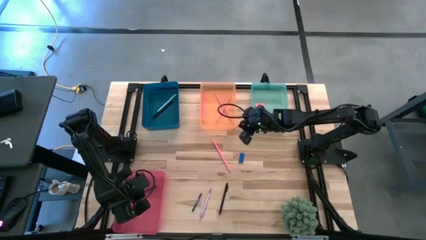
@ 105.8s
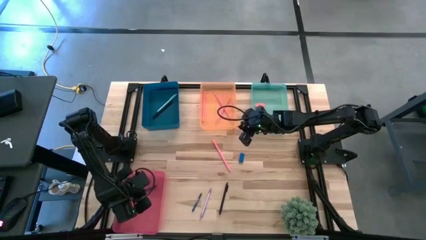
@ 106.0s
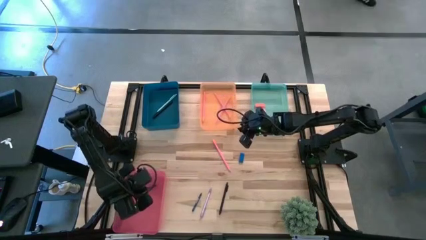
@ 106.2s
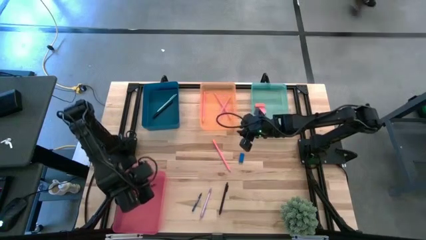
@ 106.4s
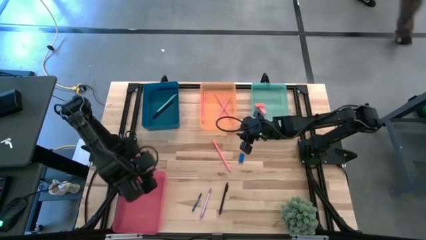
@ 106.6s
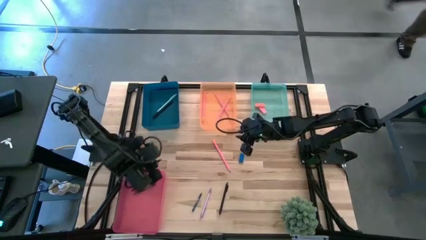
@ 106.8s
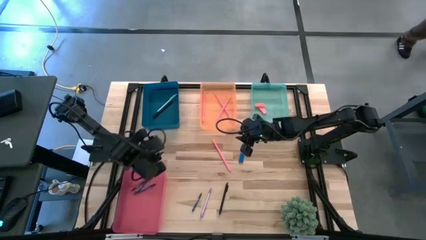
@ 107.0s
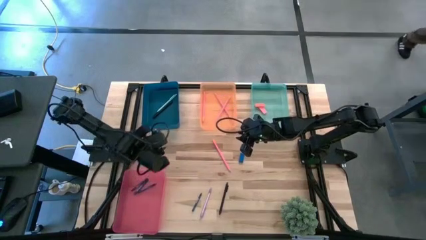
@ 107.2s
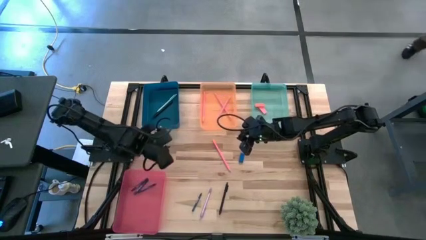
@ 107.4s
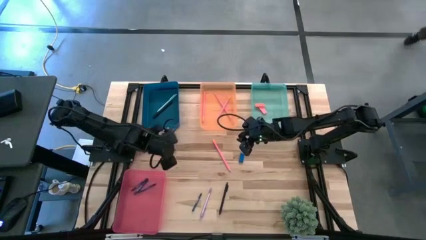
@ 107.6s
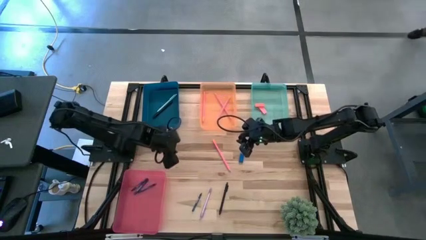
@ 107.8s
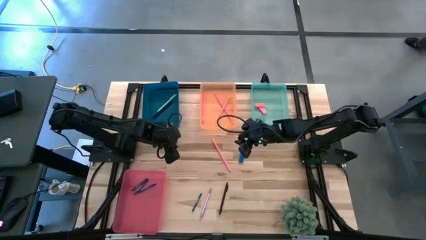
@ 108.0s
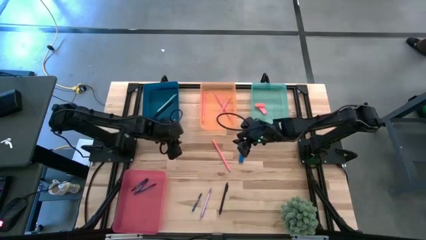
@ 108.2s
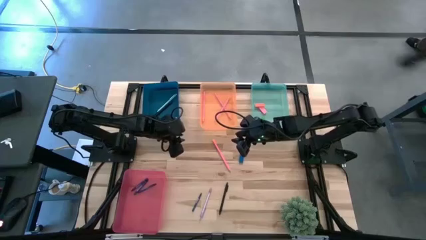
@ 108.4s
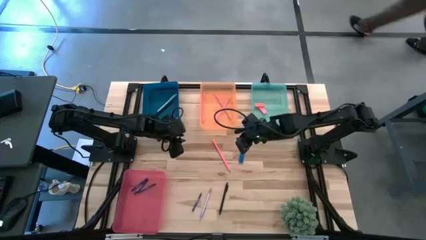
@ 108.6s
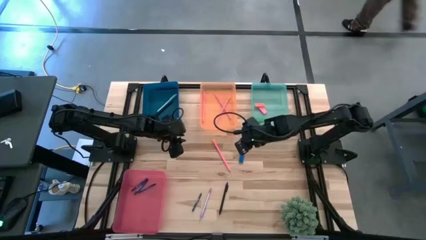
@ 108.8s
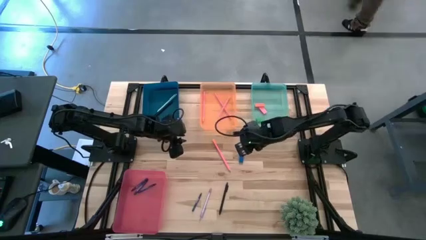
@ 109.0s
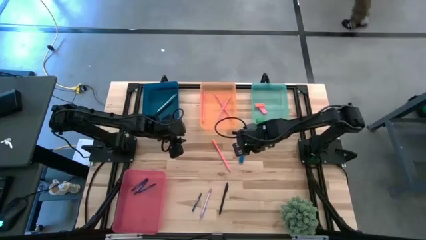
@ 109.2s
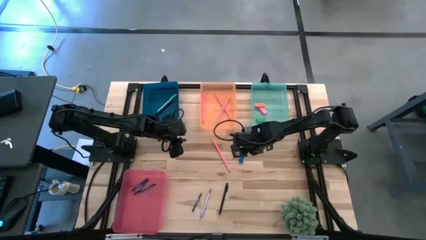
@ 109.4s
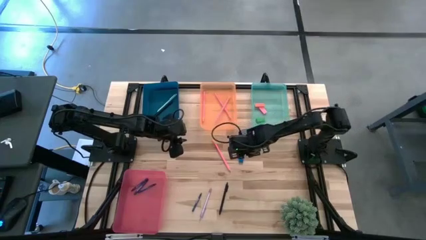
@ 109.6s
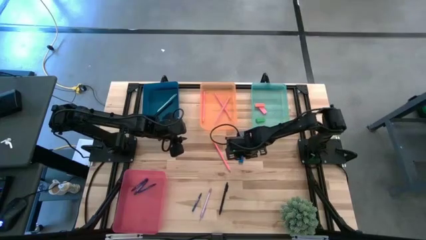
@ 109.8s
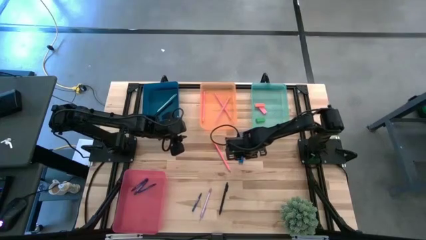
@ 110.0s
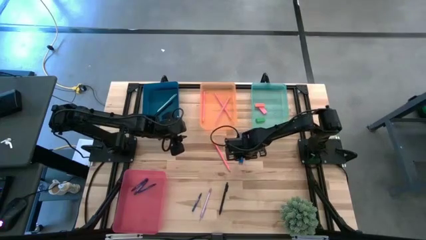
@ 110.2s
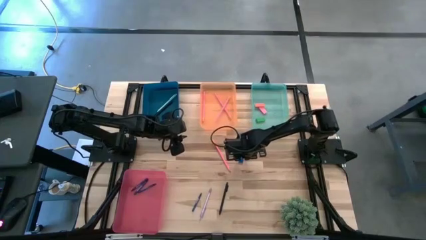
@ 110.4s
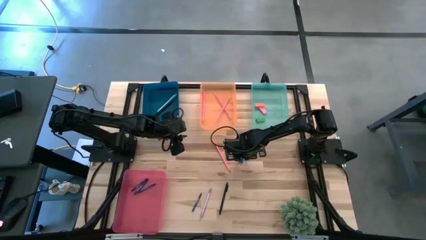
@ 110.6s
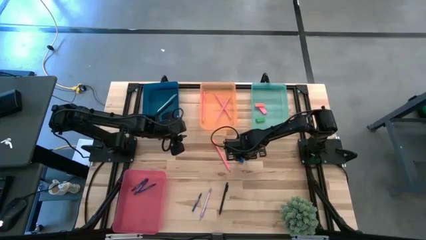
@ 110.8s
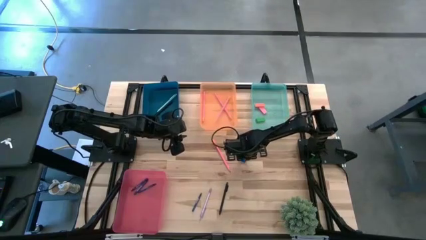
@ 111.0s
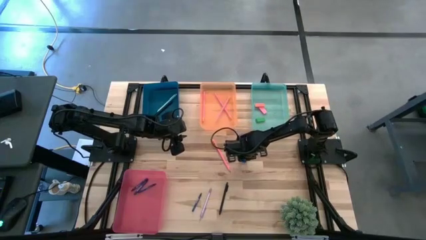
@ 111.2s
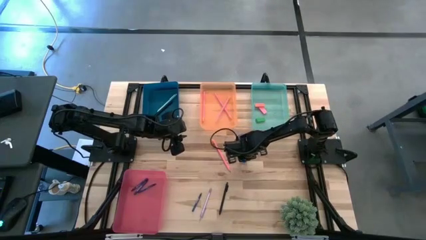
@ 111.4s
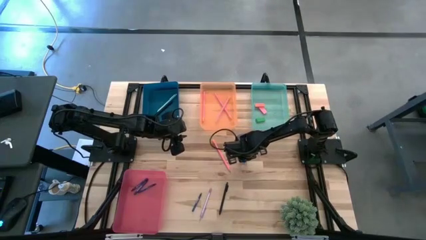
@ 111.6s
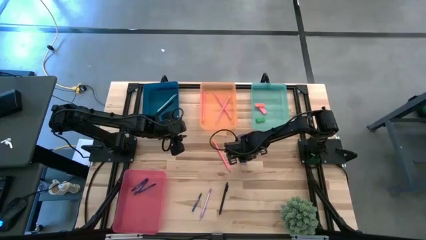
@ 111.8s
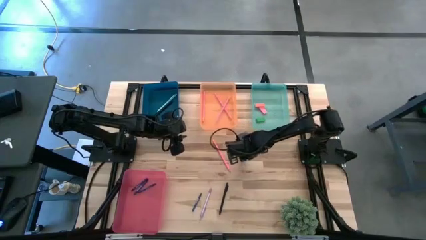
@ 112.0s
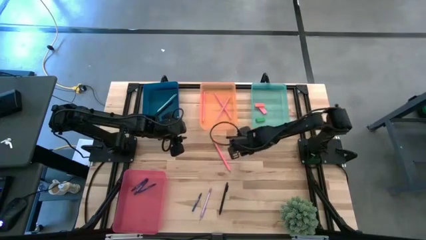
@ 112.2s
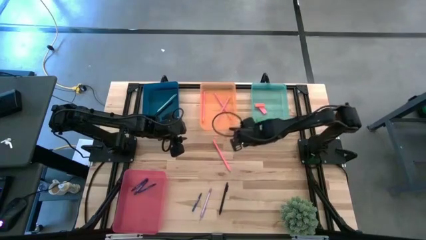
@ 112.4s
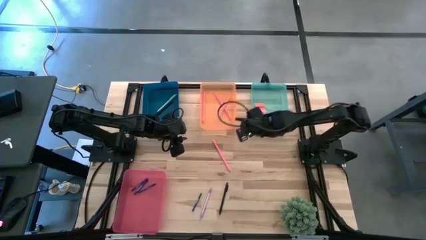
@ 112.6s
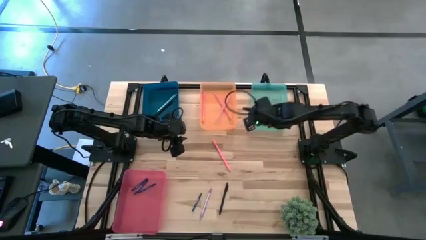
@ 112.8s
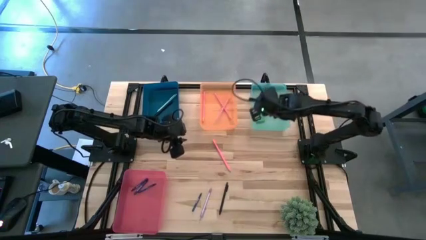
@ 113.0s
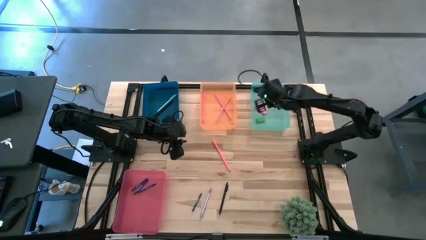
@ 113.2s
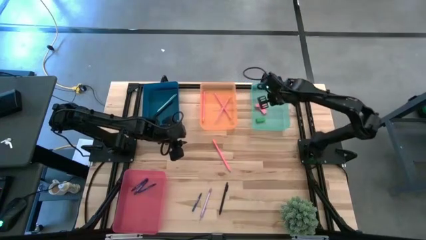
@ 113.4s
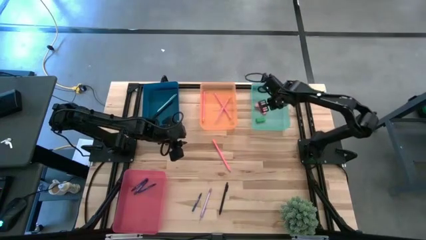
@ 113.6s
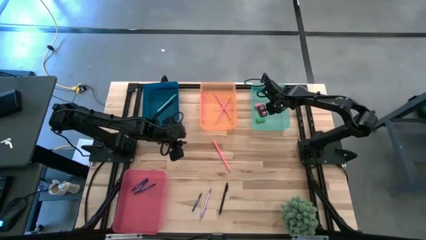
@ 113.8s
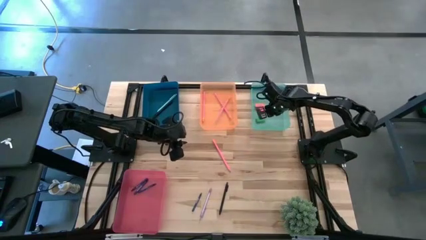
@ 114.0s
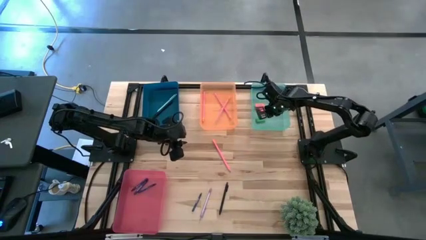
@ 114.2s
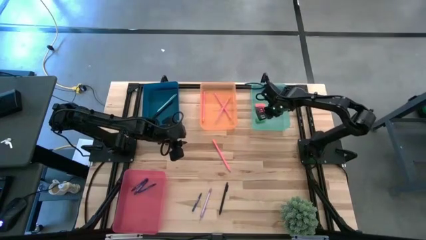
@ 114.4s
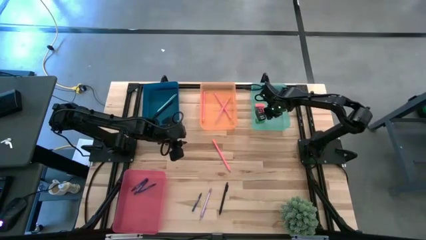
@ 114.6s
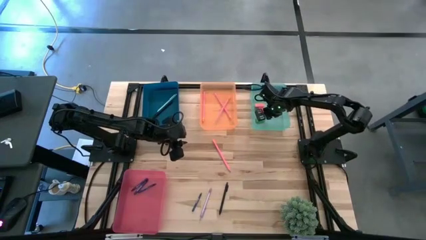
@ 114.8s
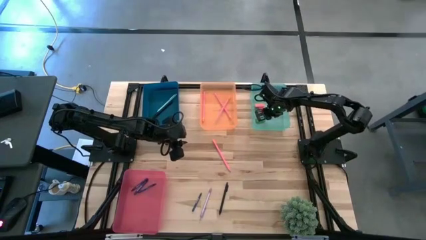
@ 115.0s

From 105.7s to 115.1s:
Task: Sort crayons/erasers/pens/pencils in bins
Put the blue eraser into the green bin

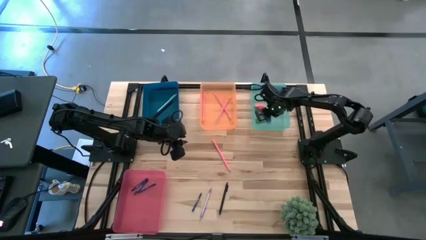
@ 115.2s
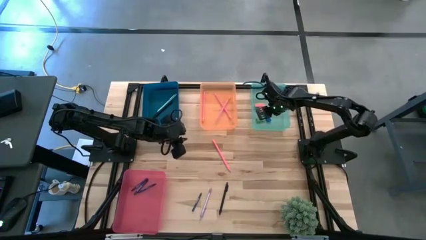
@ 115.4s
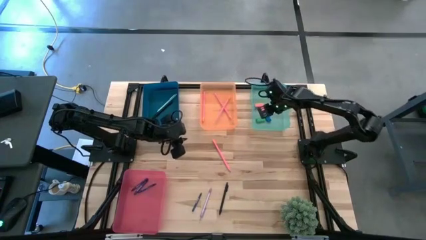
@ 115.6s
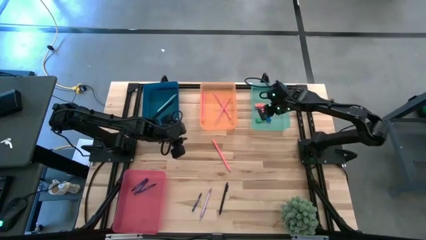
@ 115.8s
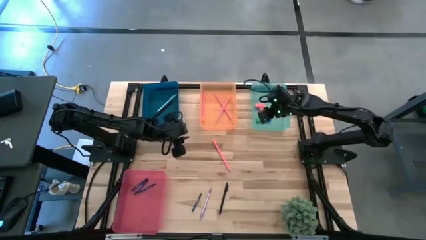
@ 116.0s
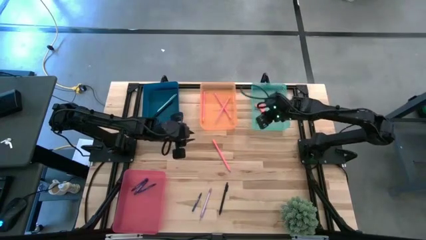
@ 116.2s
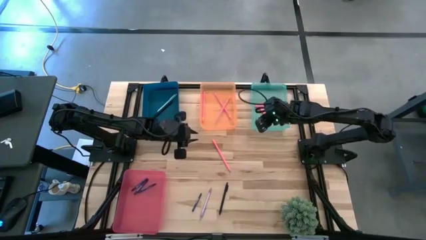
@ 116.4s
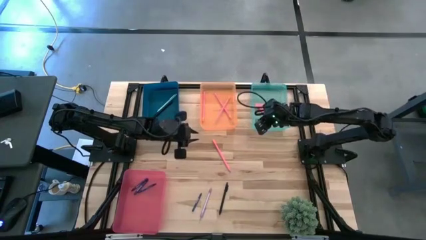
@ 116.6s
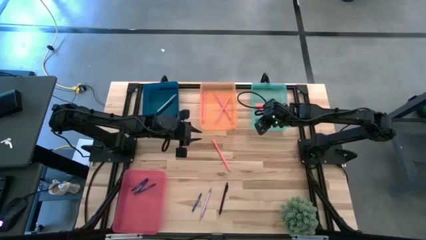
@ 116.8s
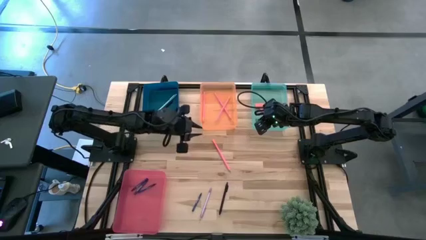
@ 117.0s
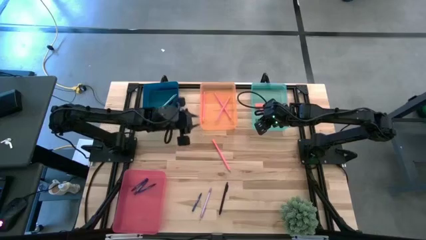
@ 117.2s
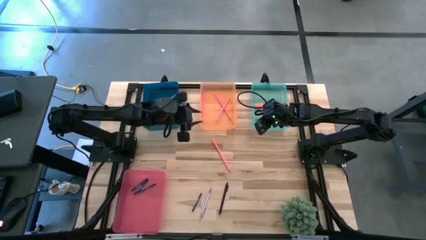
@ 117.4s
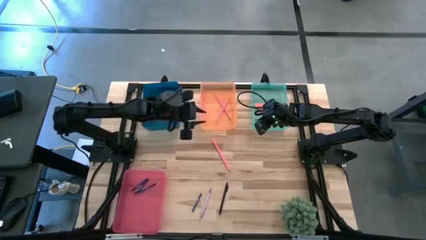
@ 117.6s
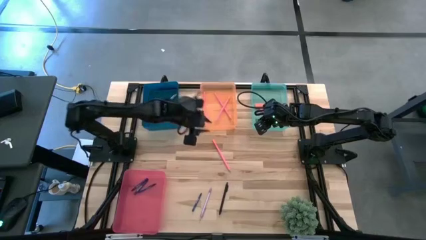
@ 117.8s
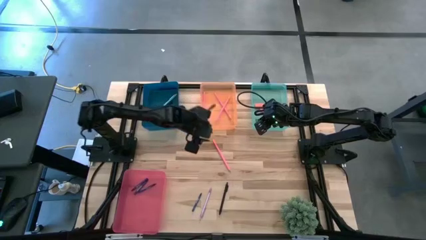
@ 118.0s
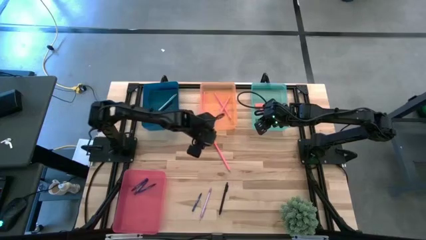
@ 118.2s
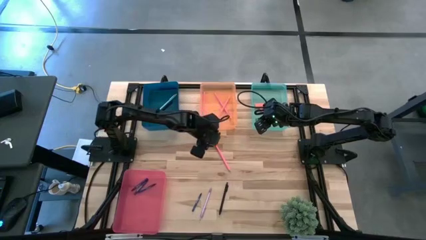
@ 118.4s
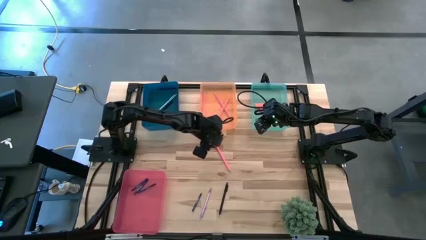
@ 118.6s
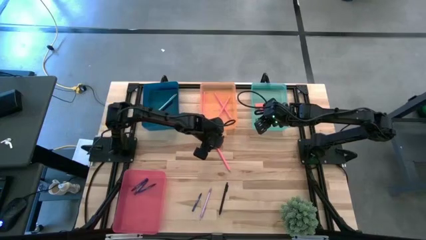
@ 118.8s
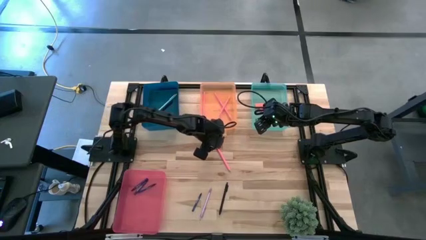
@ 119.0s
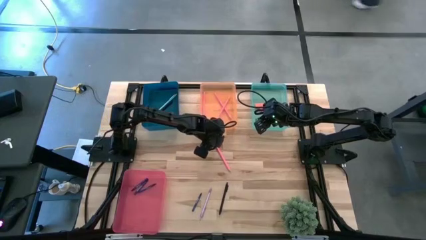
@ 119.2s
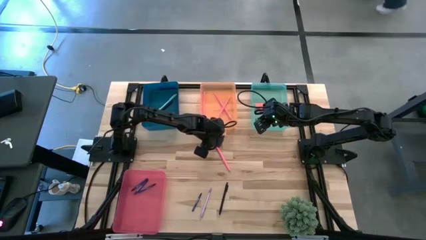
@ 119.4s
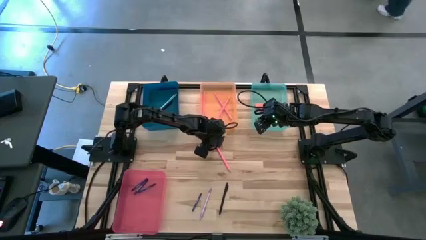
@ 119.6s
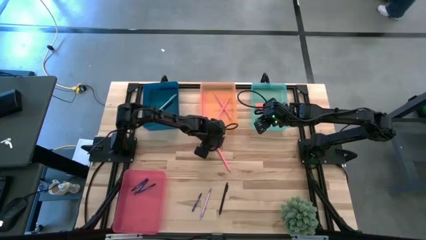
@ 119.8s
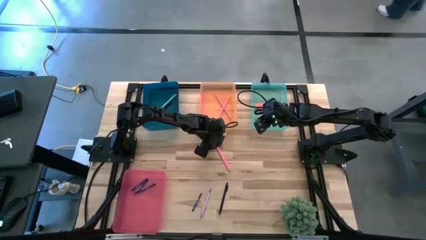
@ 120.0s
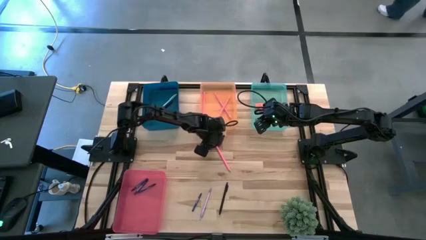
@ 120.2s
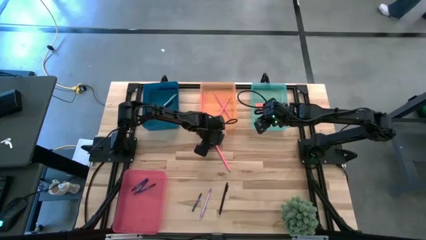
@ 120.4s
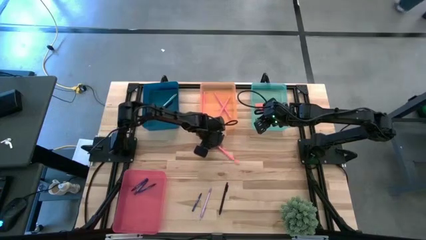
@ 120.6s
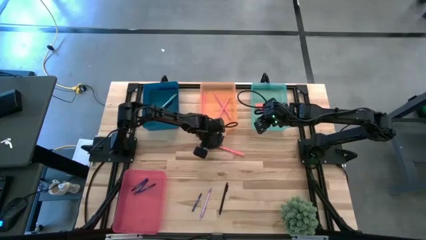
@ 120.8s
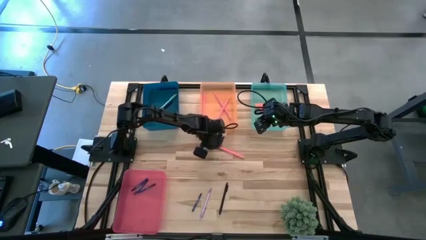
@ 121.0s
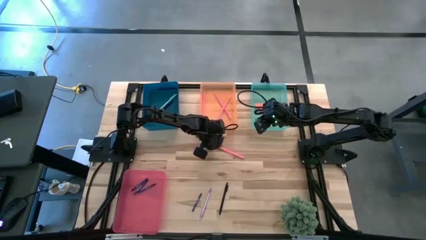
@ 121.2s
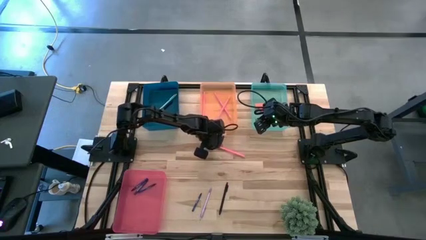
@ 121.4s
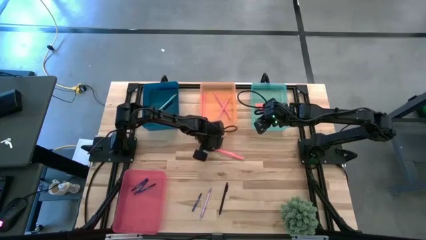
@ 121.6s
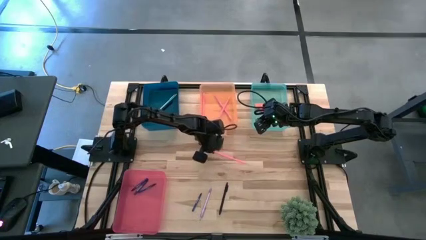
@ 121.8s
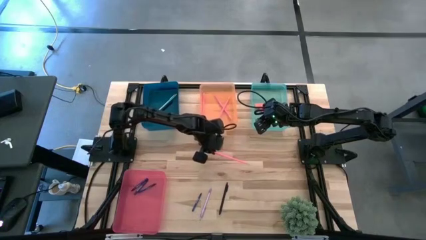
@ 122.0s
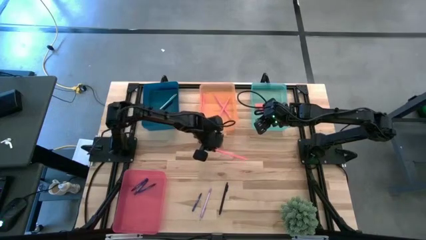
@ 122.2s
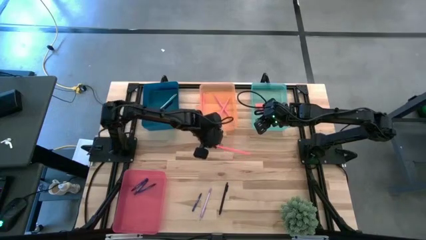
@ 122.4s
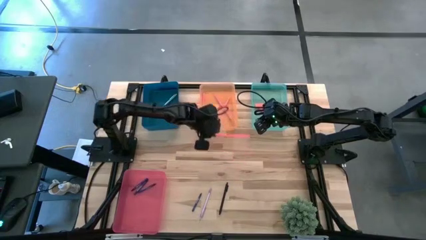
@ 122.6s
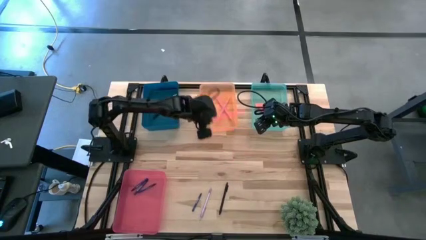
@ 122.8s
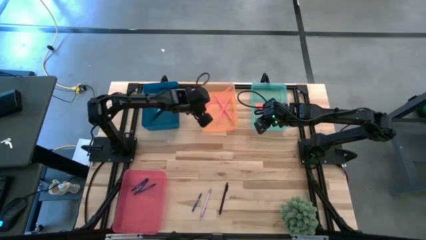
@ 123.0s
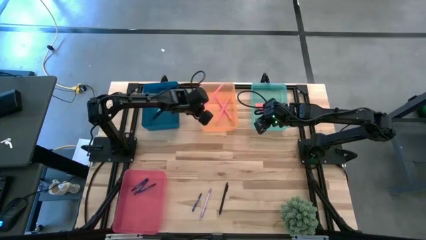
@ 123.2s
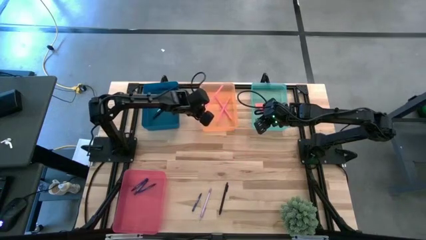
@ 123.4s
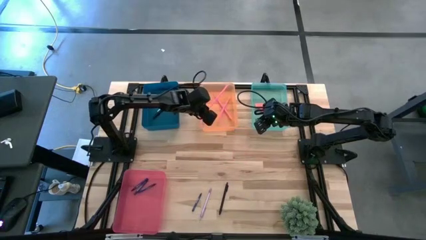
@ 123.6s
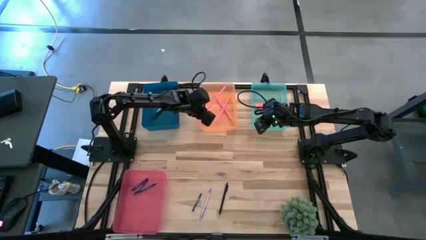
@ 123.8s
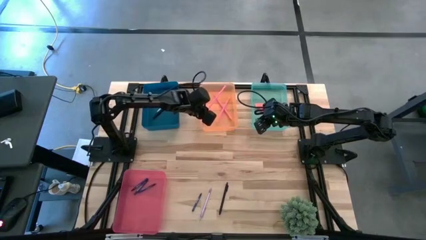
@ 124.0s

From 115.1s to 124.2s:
Put the pencil into the orange bin
